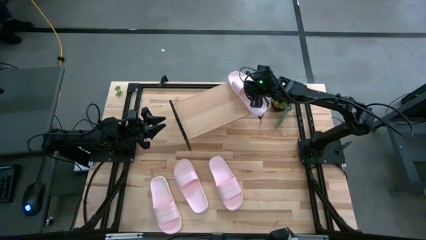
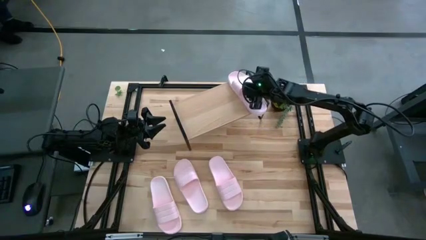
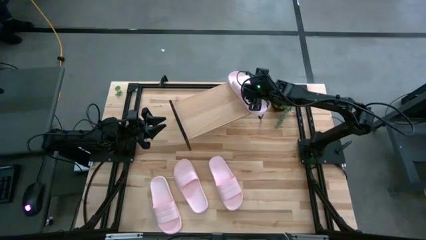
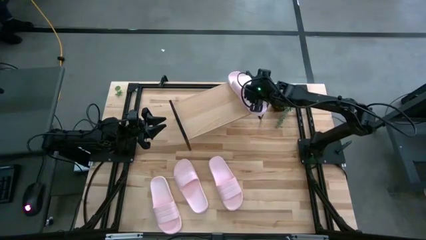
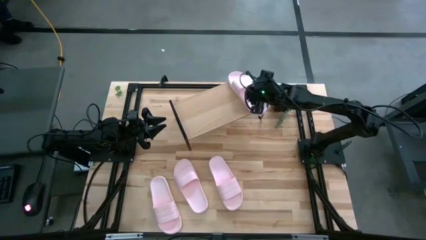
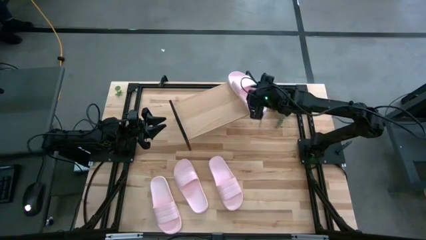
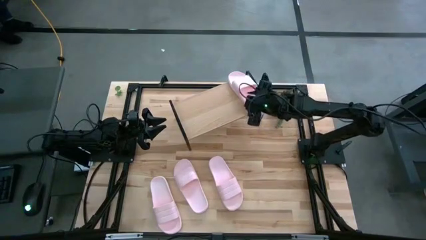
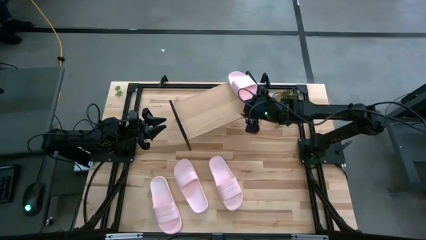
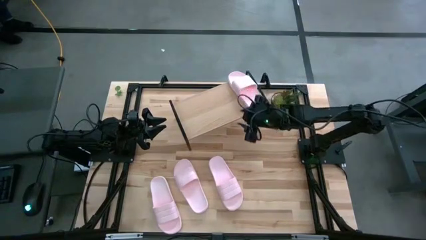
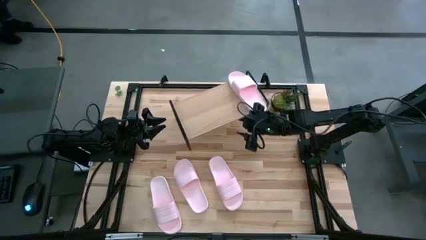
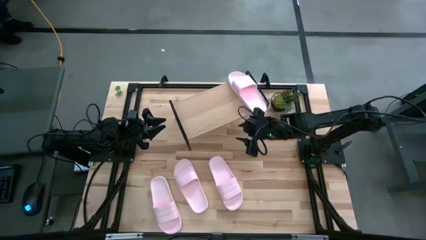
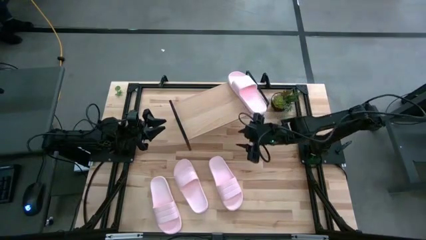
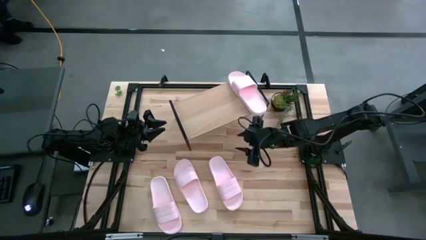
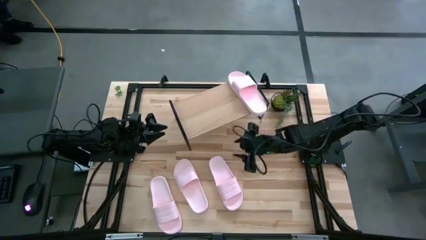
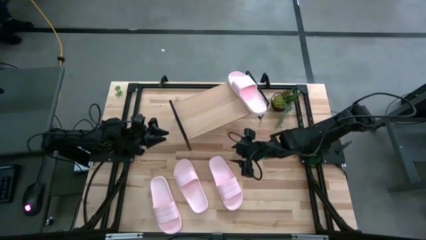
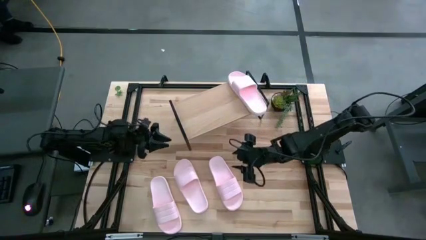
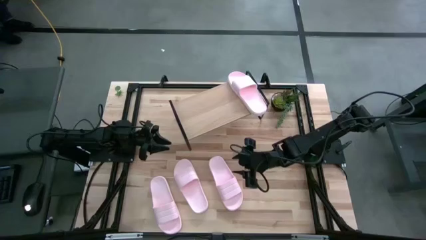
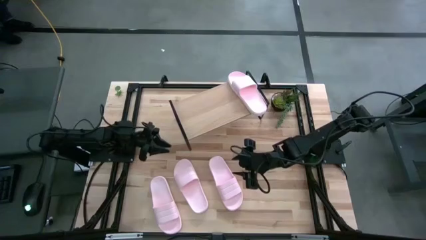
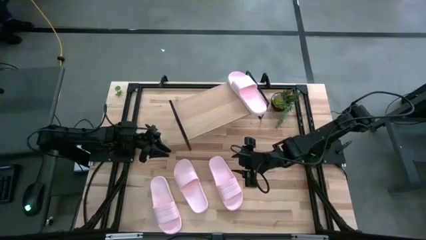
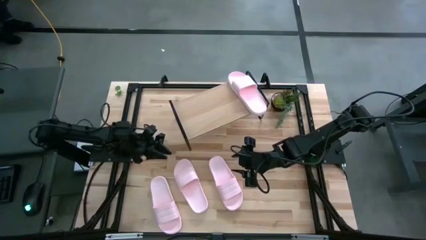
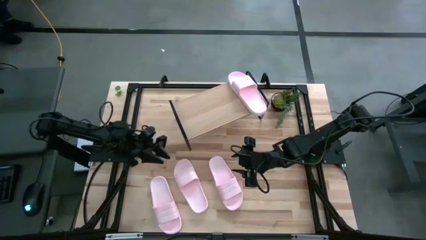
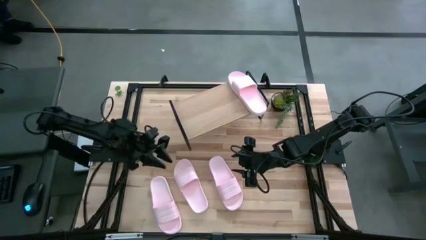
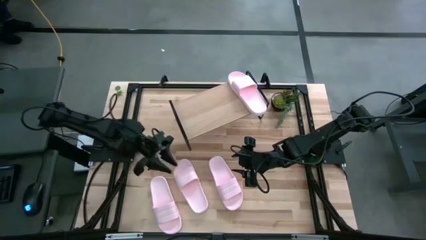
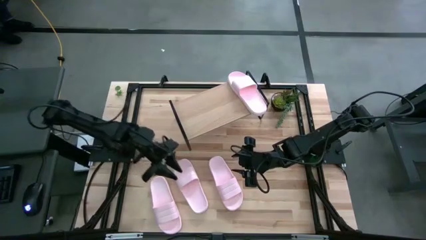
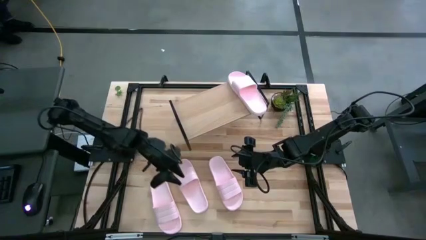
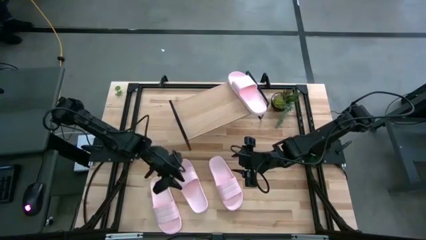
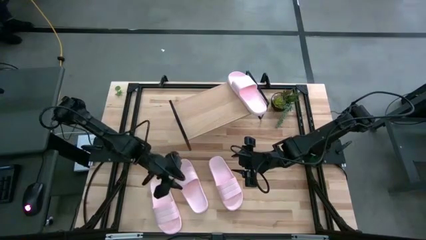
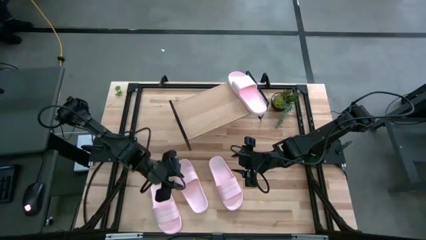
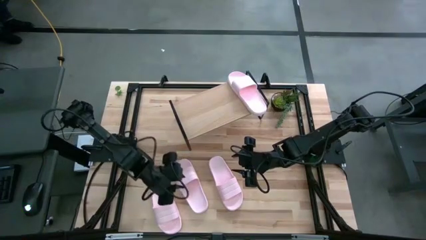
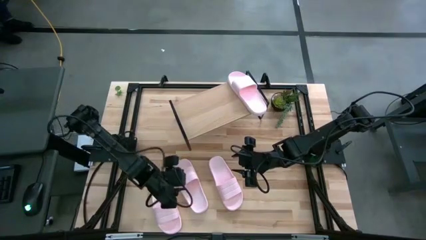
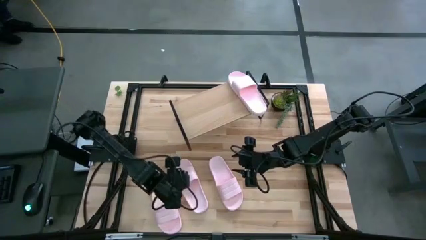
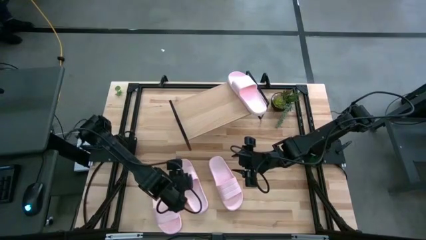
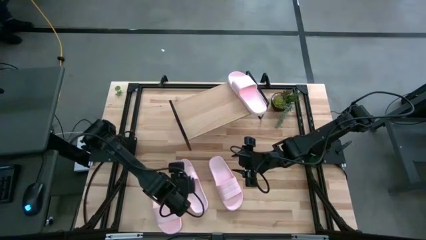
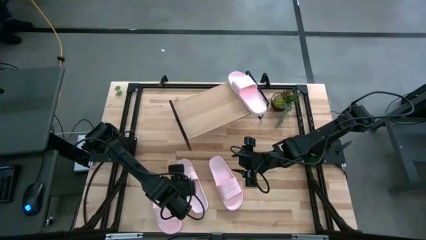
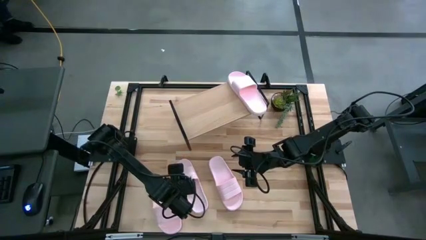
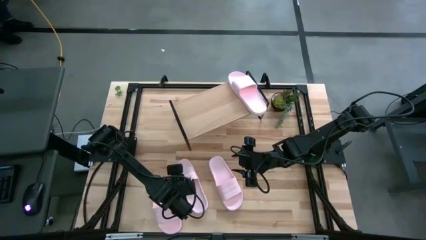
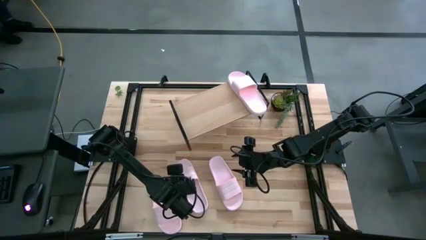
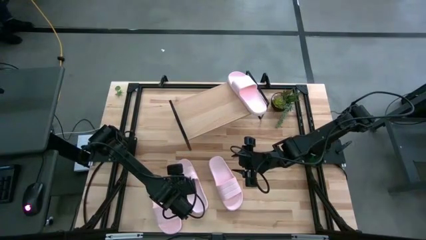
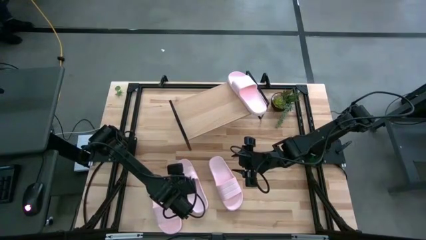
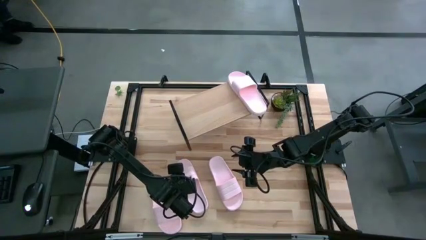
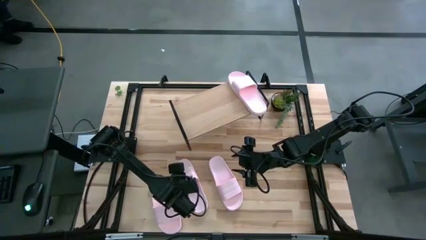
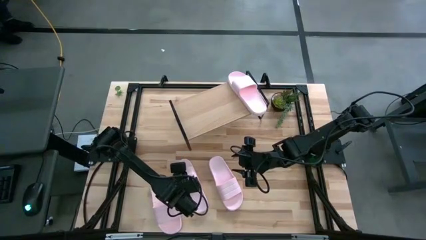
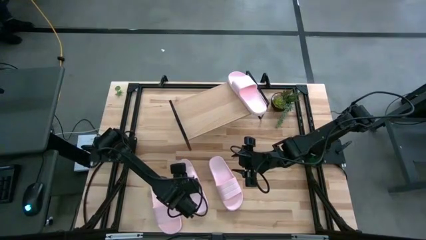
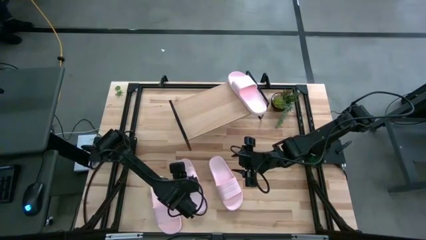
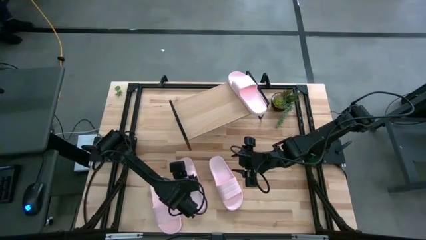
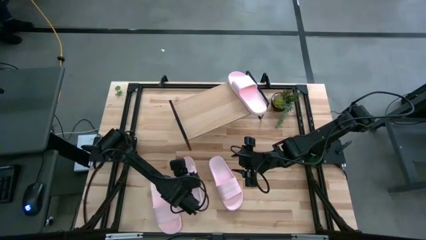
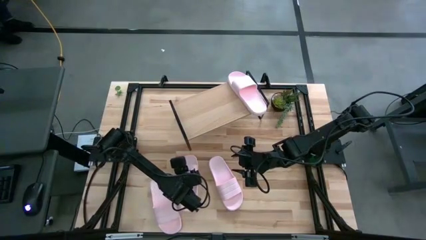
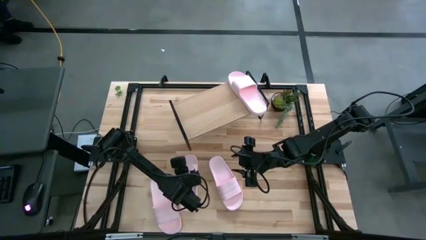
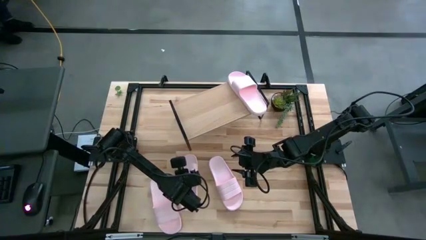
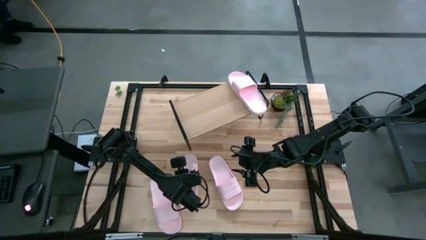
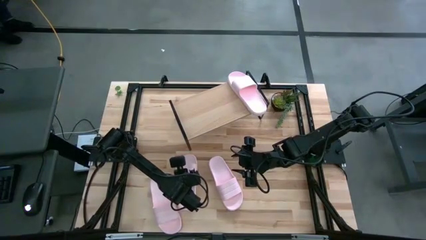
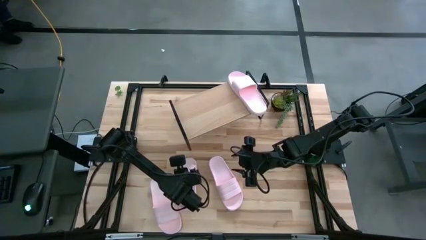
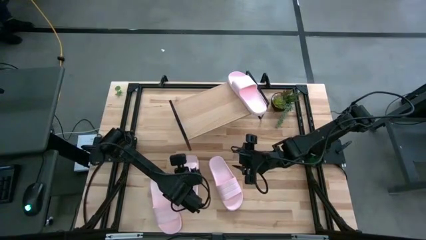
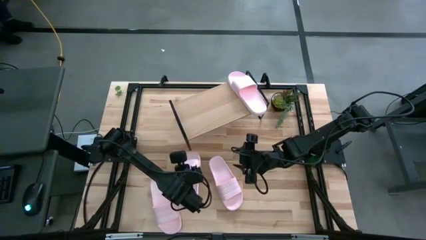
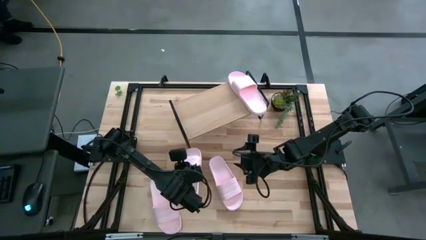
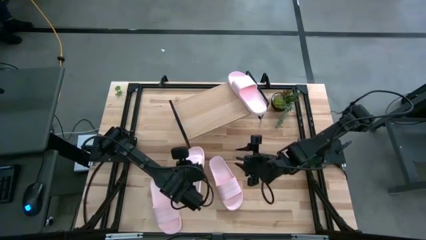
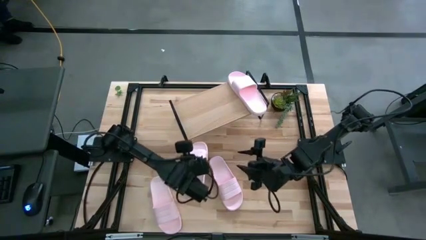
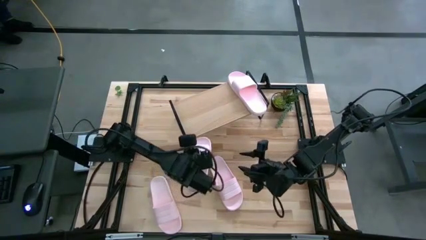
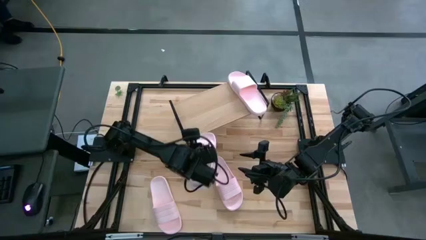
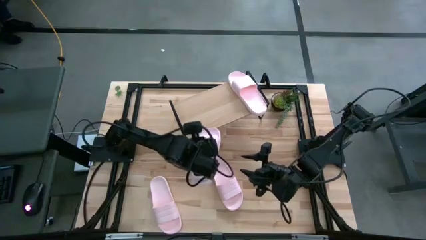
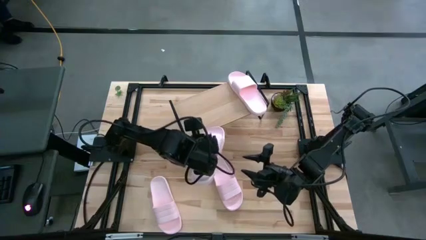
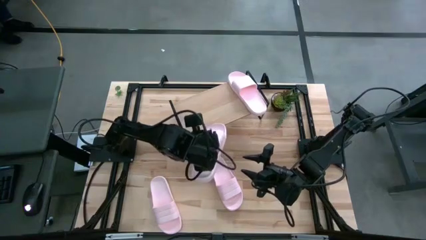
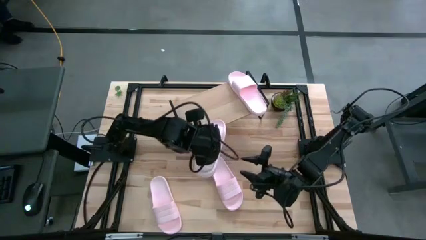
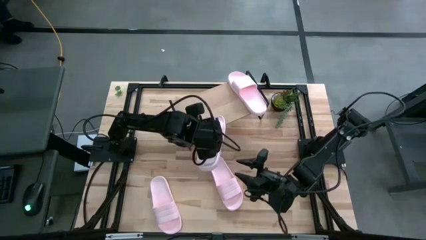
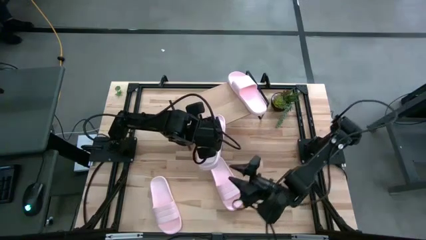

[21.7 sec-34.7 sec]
Task: Pick and place slides into the shelf
Put the pink slipper on the shelf
